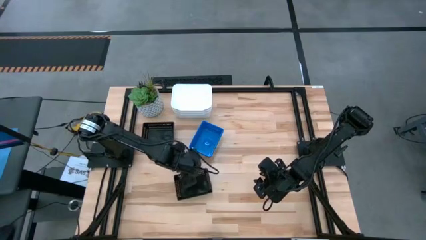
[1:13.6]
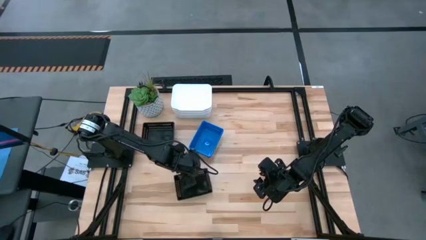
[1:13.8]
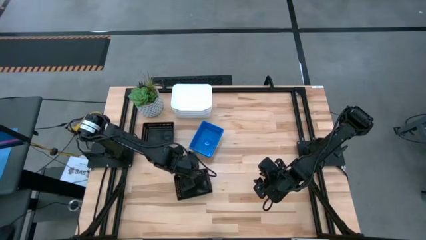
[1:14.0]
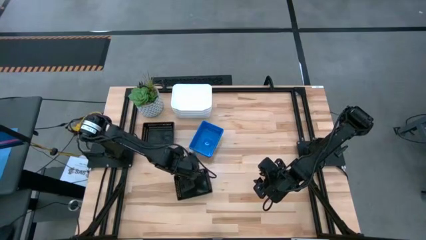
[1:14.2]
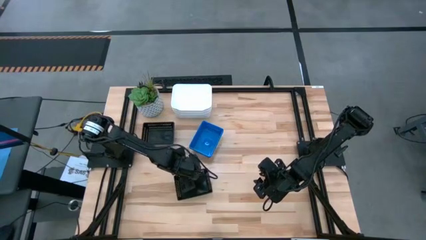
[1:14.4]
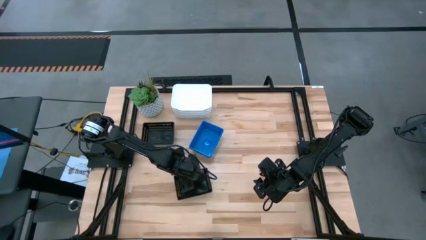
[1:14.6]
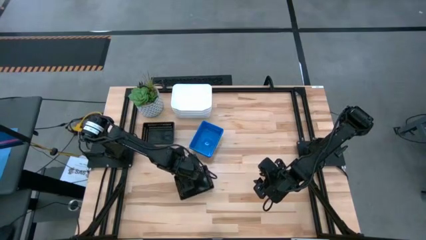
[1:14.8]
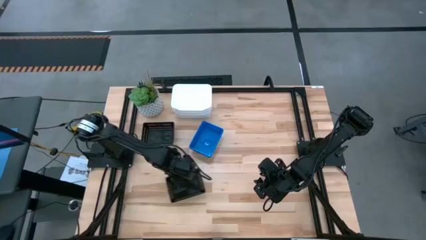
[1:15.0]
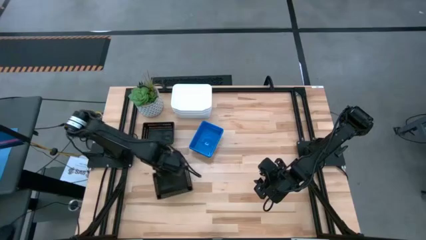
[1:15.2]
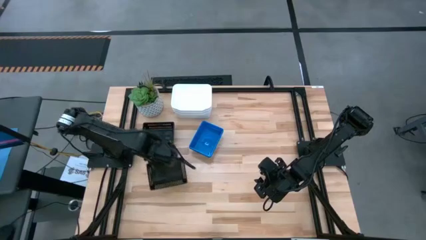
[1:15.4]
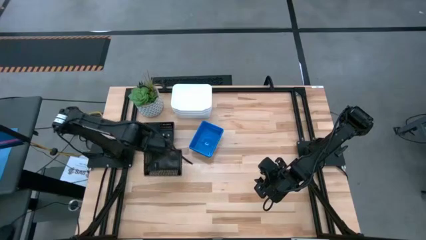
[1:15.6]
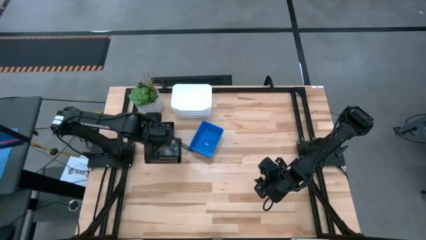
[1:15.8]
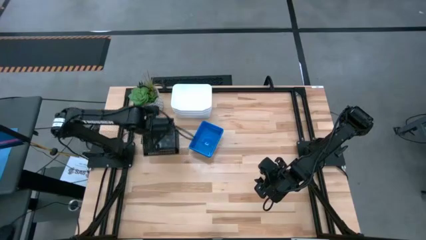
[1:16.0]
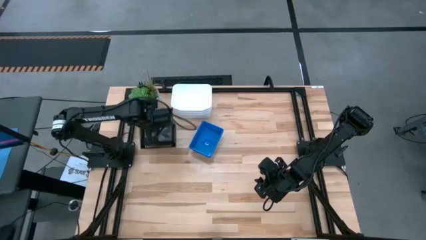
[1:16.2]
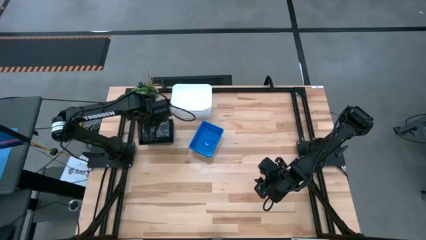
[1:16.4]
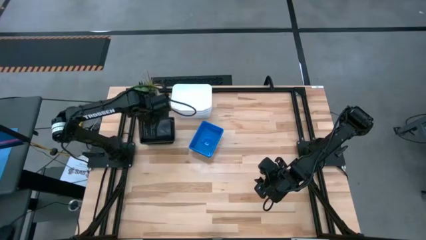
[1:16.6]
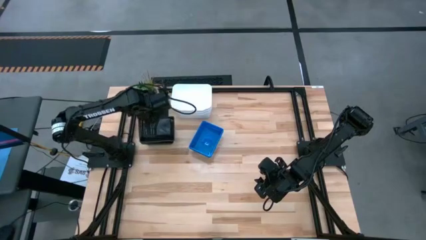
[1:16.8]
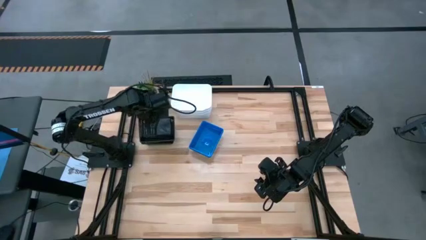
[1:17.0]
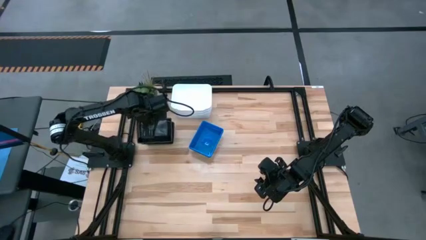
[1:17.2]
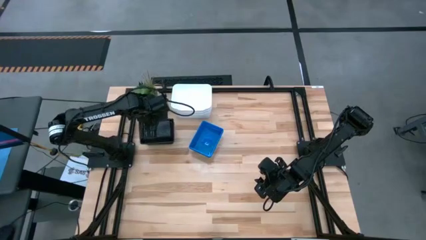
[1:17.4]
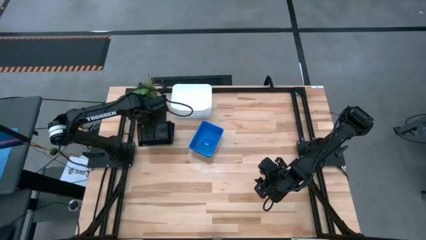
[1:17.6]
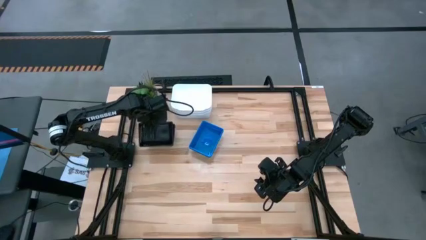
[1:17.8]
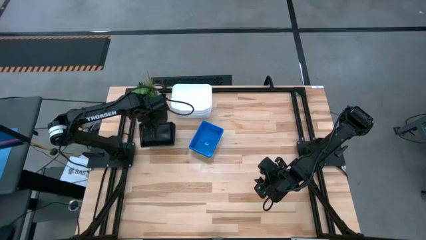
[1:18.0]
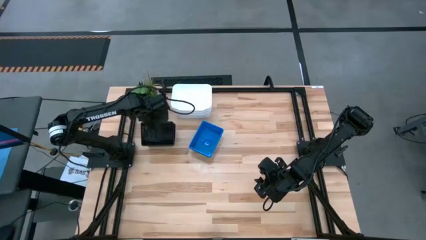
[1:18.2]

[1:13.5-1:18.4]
Stack the right black bin on top of the other stacked black bins

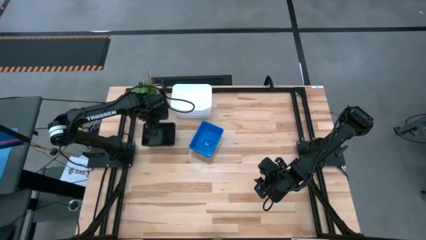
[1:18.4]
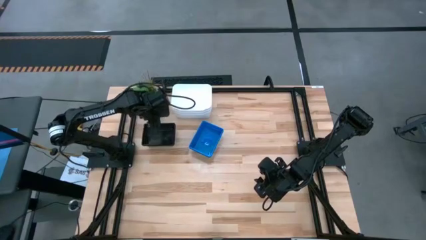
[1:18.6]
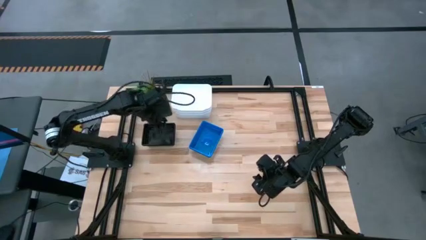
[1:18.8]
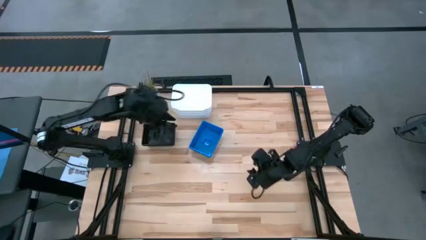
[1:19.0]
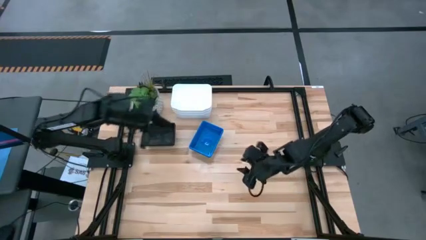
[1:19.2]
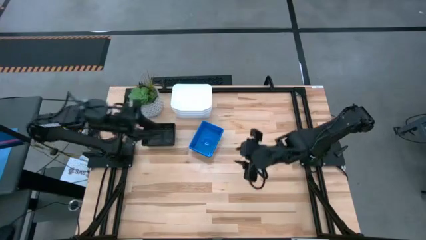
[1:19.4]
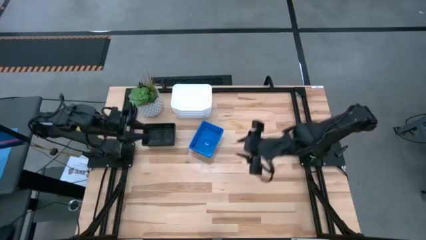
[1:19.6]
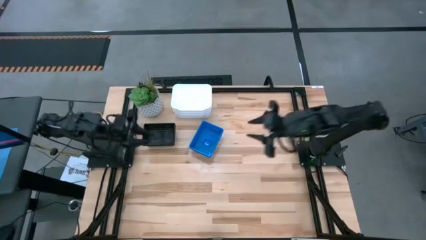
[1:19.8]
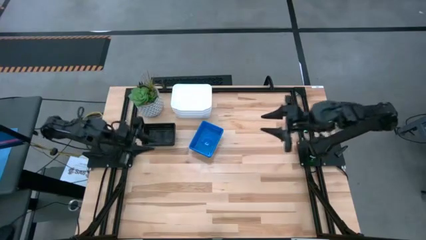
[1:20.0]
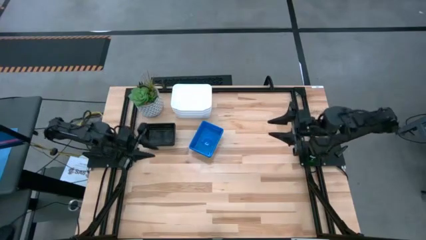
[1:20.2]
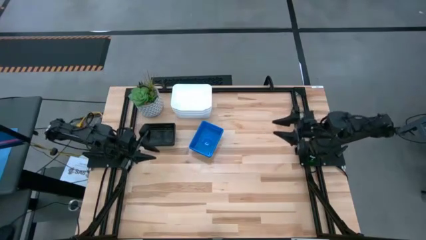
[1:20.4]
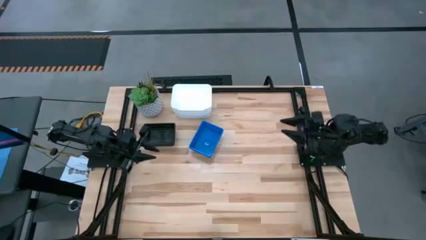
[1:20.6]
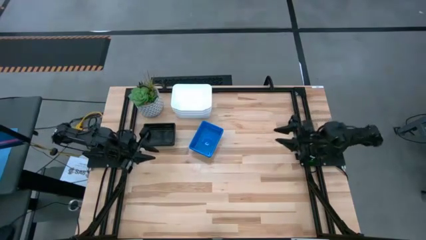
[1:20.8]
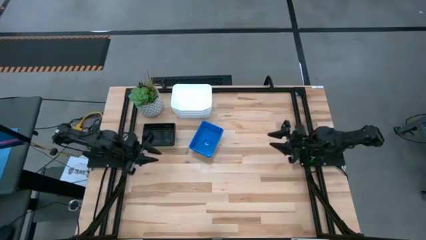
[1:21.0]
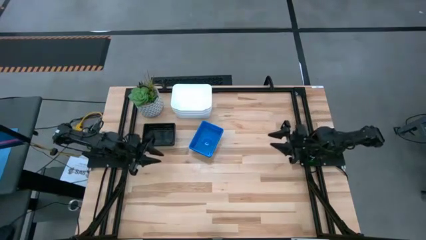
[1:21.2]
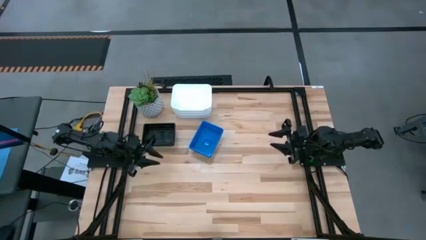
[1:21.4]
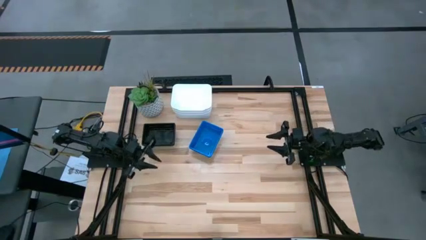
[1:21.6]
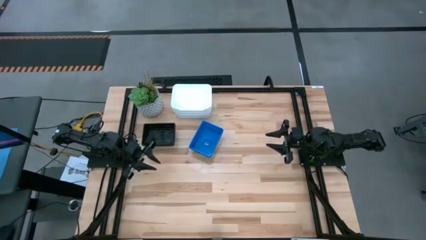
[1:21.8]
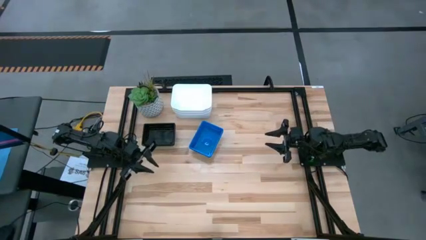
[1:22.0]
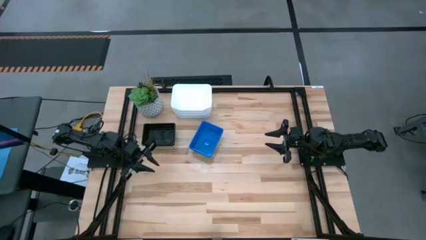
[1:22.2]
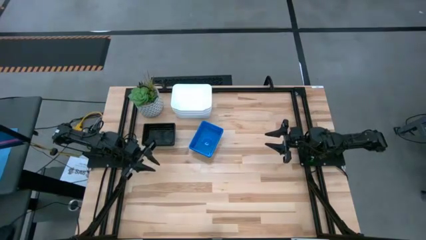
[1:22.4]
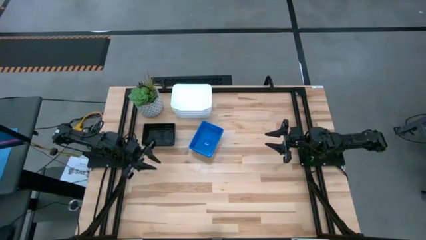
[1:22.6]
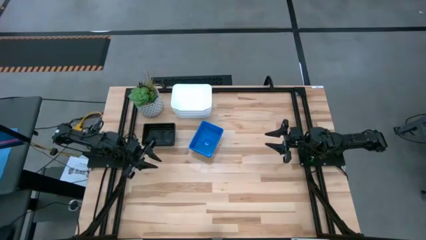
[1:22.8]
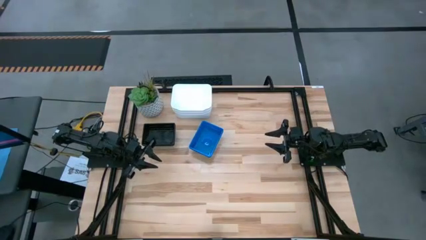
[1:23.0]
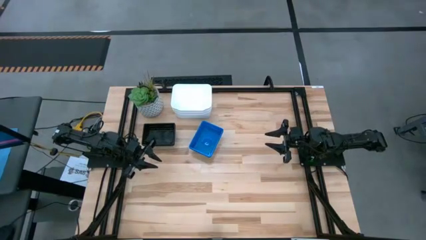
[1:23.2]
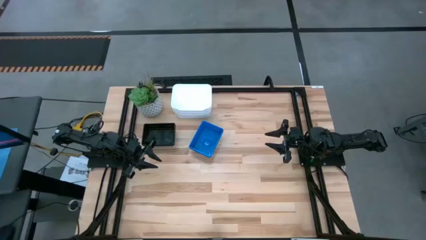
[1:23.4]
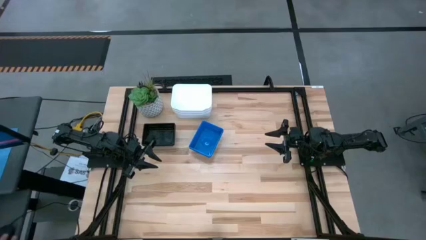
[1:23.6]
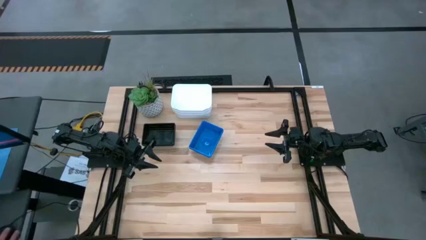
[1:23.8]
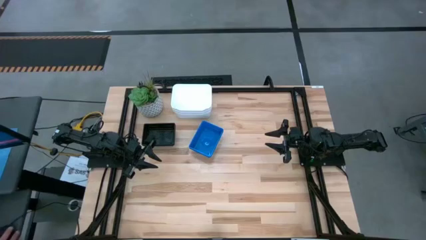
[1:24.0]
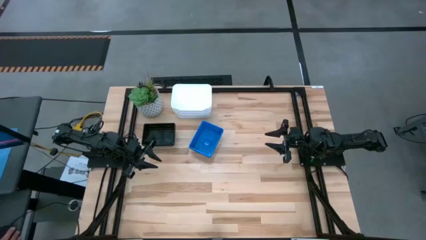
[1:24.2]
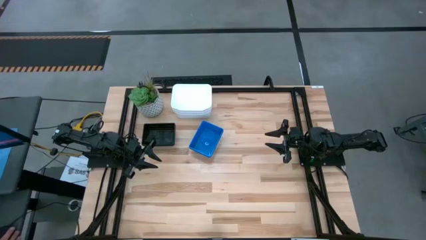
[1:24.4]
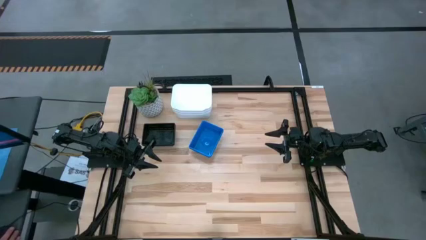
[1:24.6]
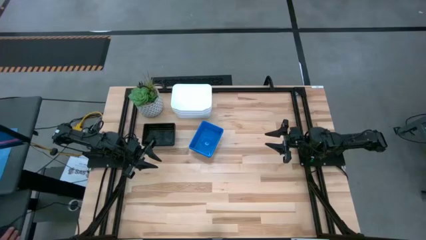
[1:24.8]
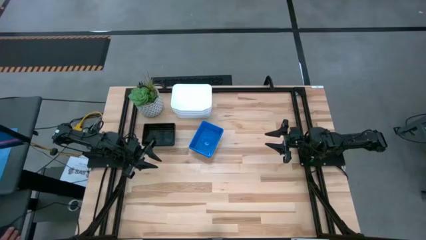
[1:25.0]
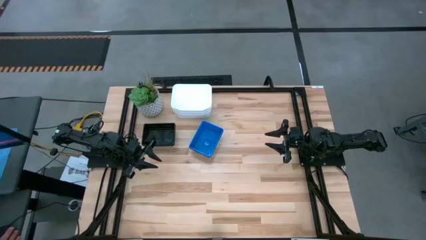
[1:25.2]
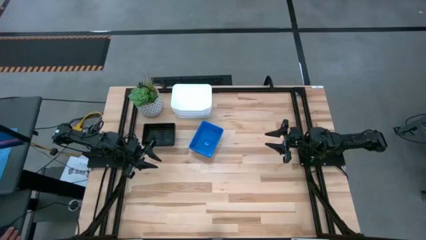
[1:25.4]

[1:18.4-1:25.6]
Return to Home Position

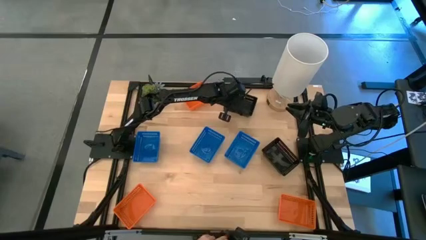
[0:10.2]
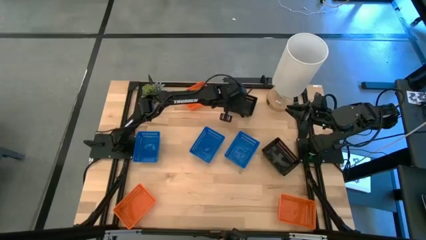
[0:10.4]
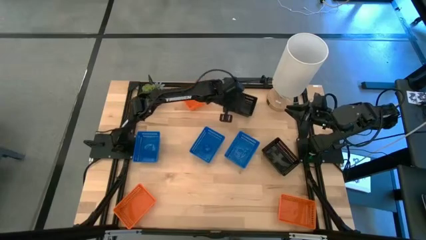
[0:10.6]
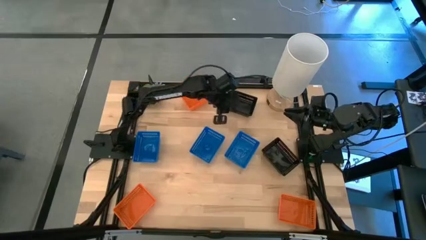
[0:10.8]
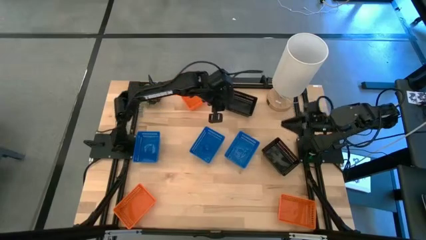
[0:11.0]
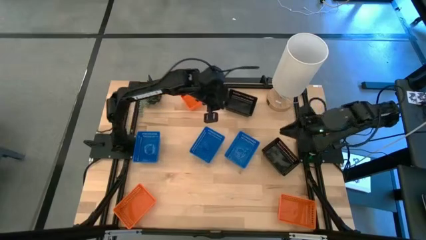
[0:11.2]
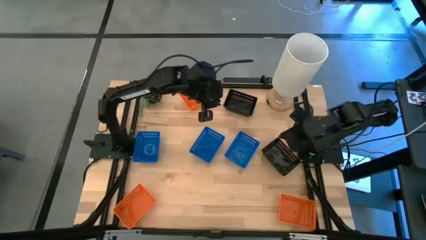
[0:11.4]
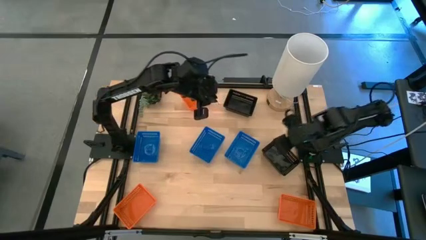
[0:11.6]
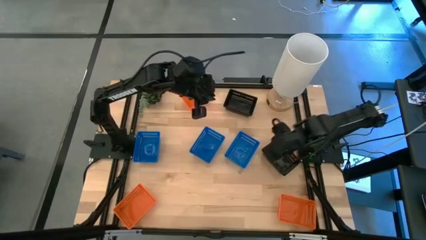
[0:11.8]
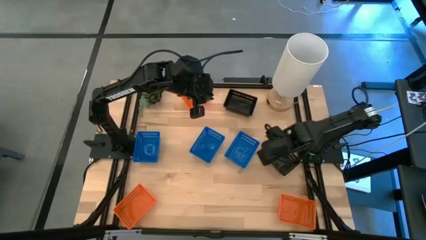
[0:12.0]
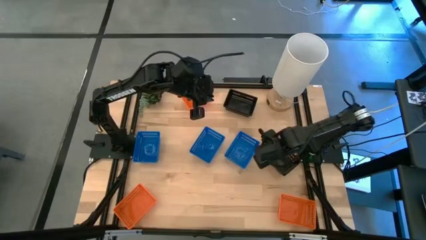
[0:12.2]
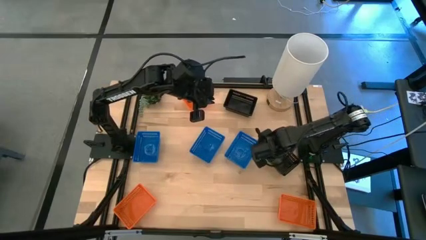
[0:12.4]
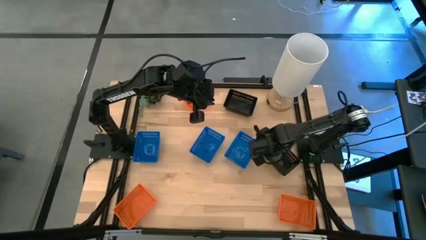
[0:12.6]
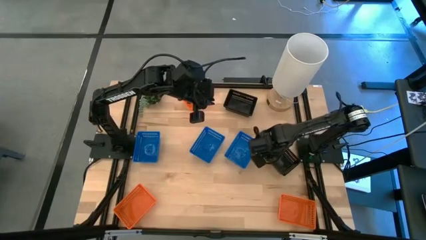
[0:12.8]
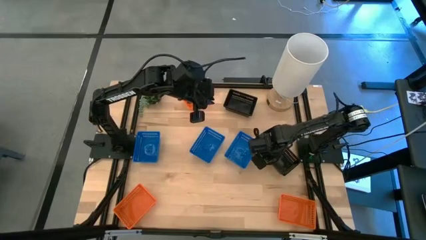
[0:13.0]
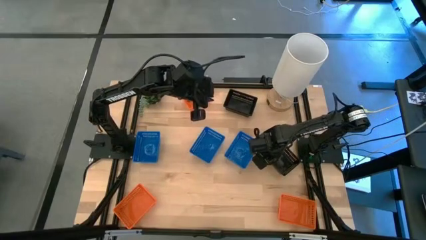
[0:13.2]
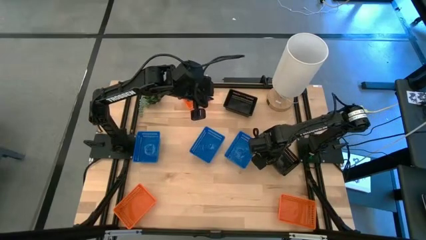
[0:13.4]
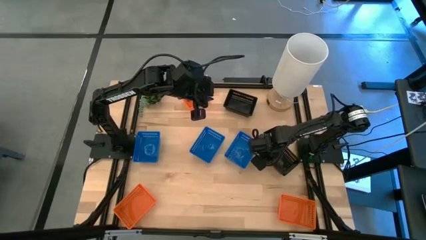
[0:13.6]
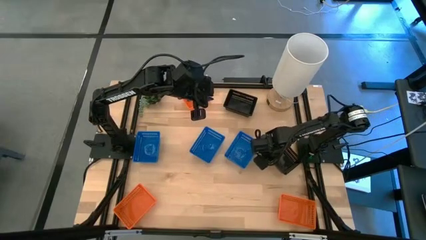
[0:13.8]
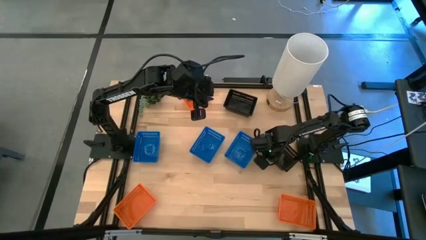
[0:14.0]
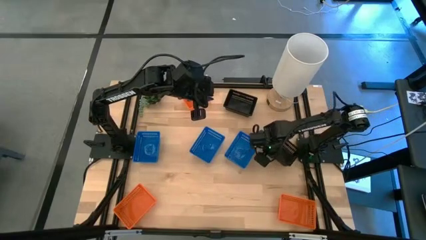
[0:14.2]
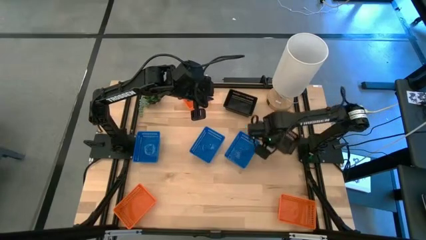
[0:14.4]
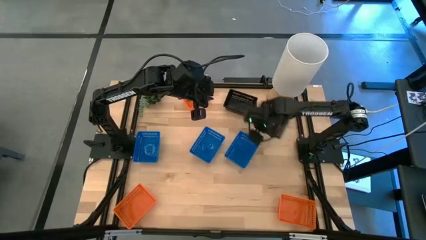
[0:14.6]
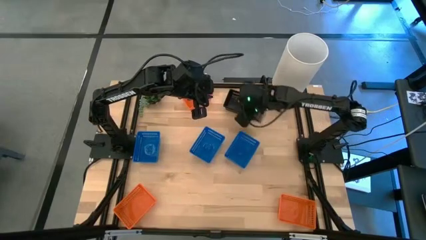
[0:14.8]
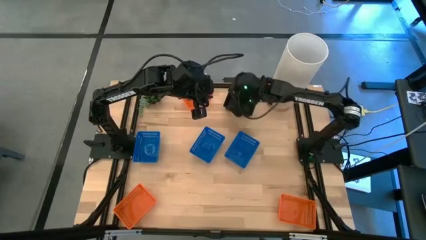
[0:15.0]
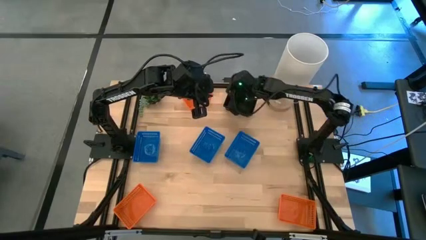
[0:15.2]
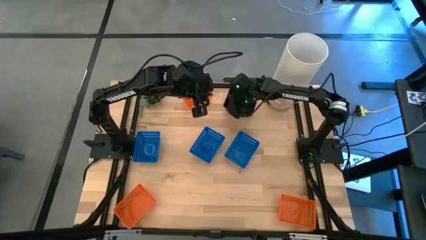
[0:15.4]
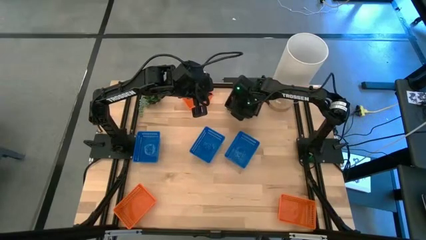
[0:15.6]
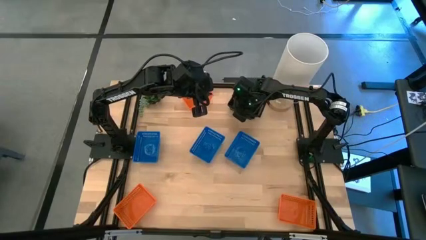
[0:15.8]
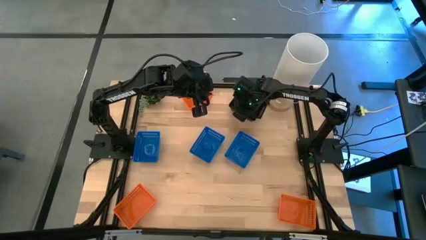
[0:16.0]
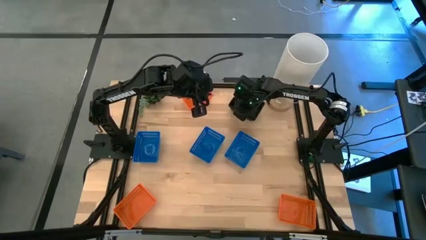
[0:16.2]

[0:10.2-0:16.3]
Stack the bottom black bin on the top black bins
